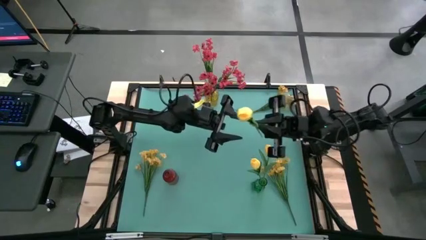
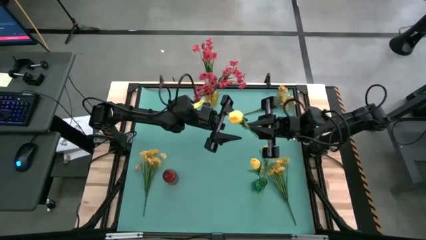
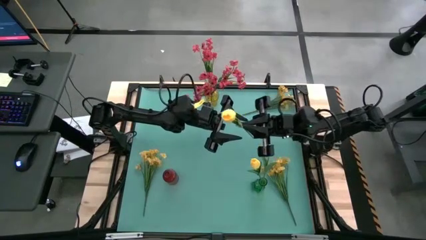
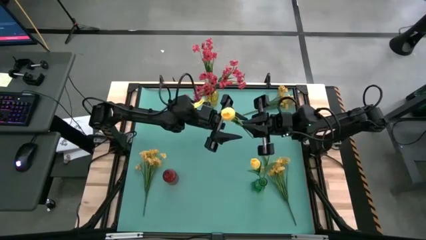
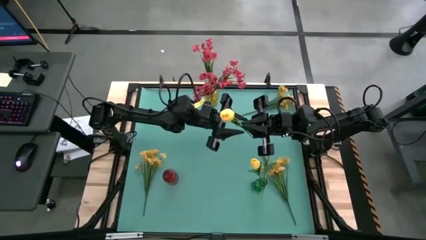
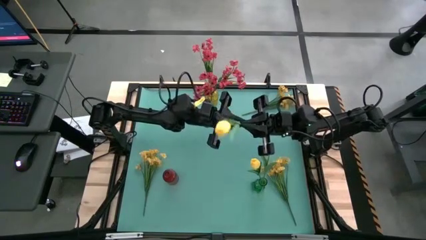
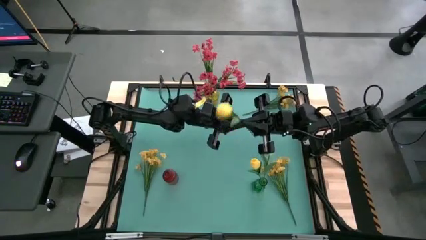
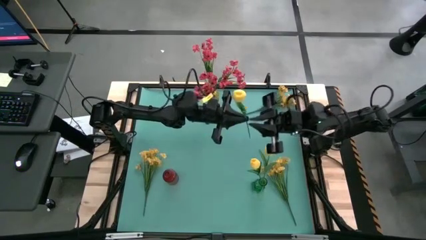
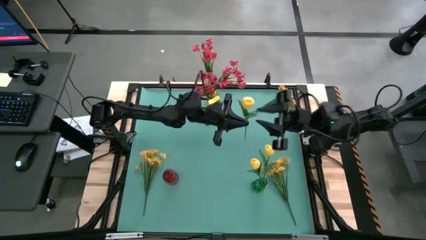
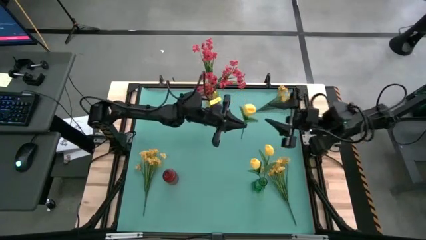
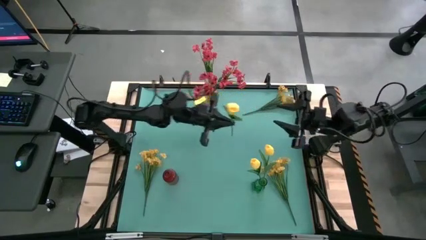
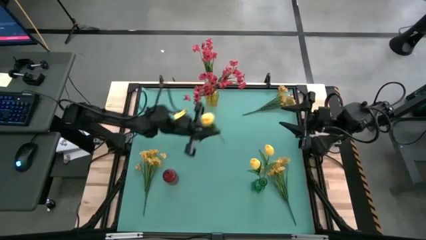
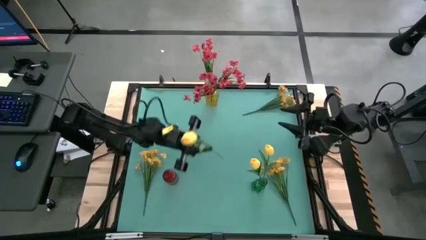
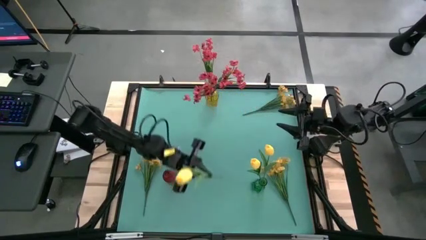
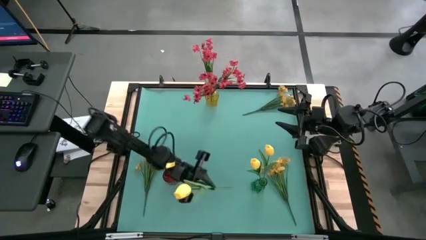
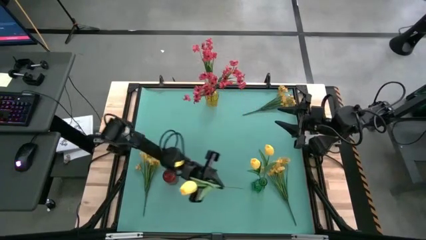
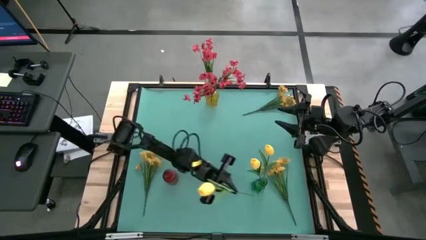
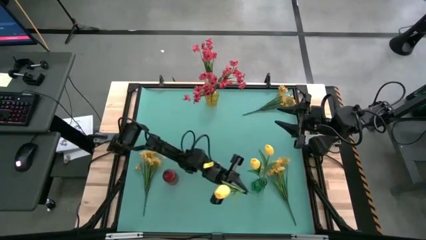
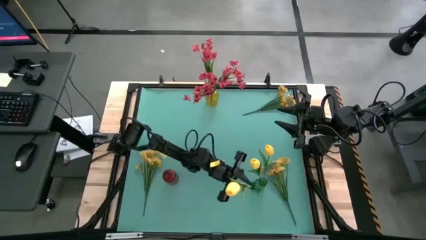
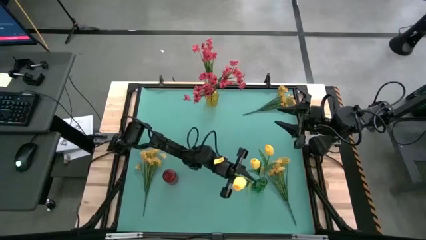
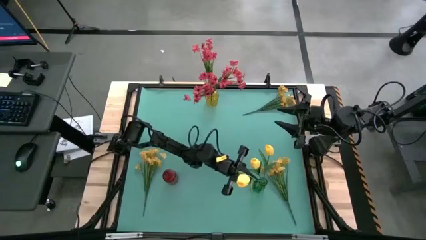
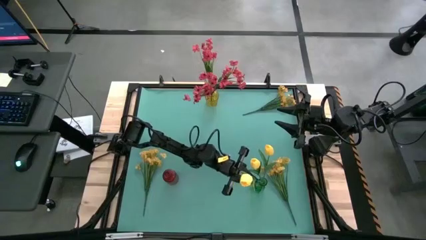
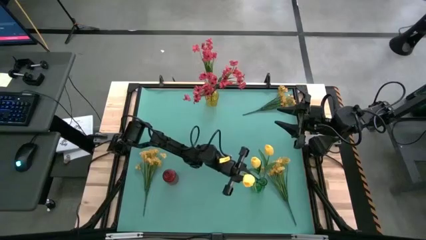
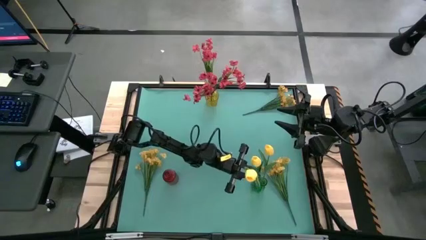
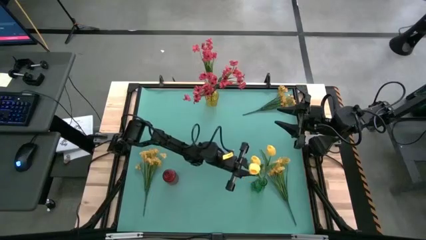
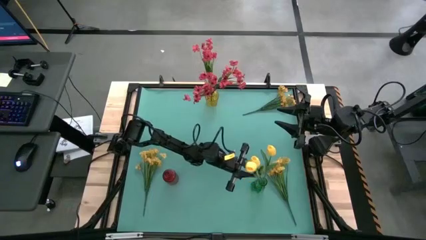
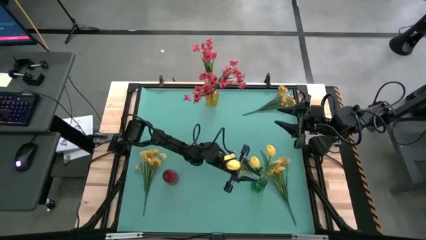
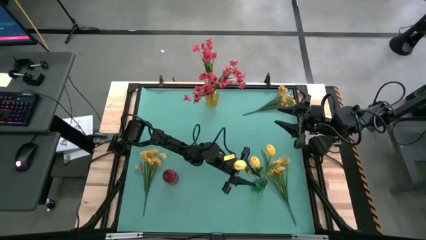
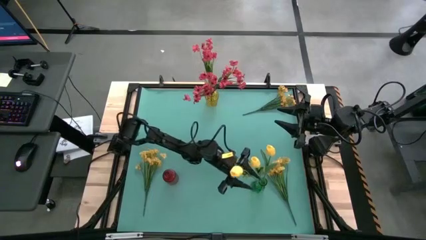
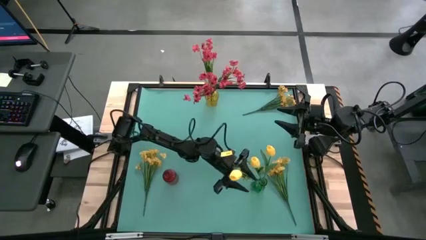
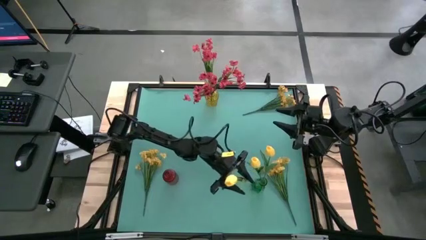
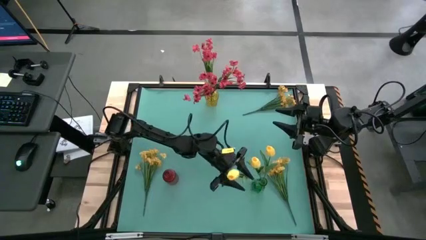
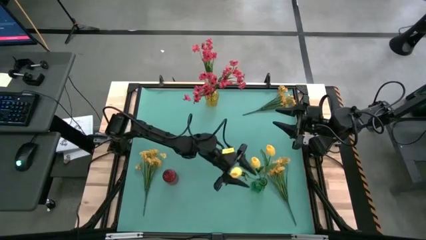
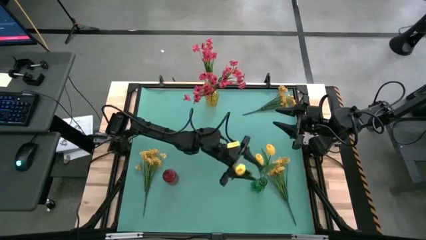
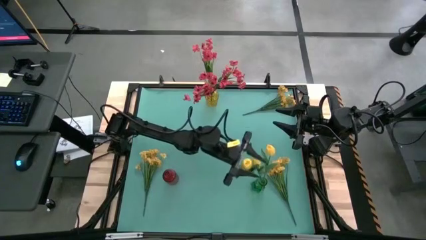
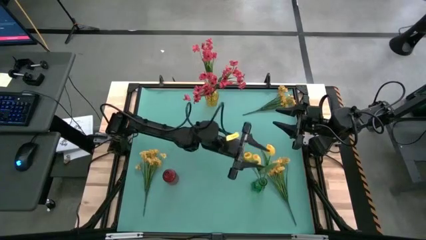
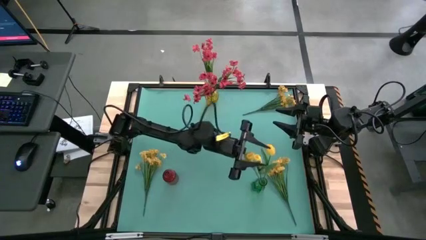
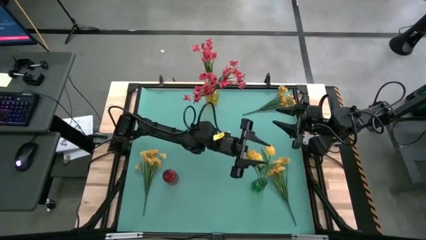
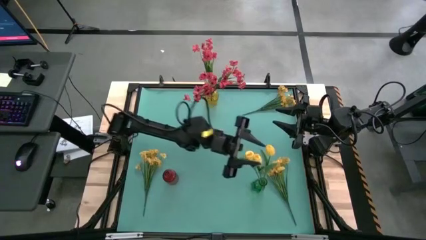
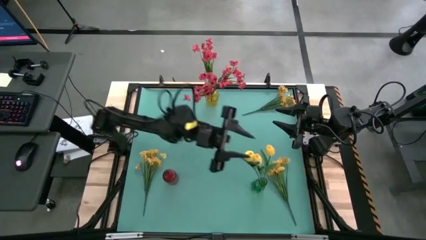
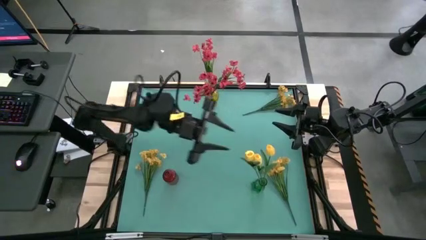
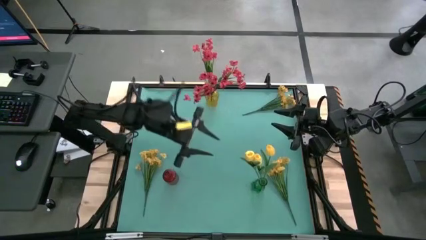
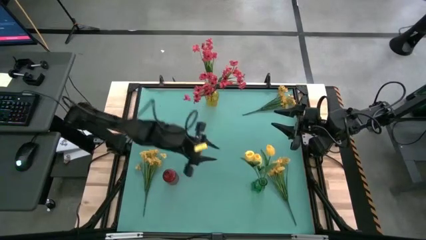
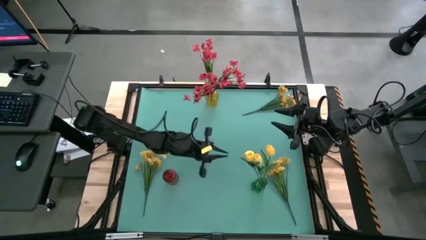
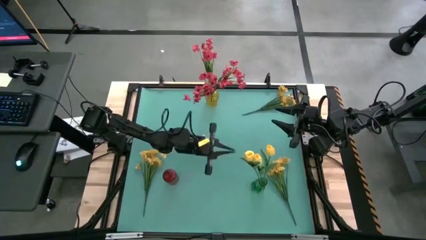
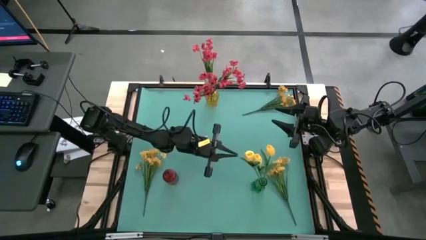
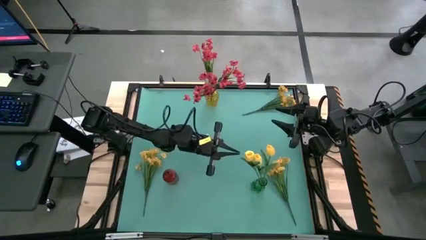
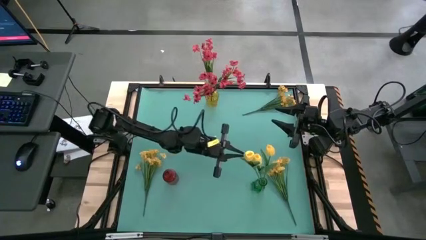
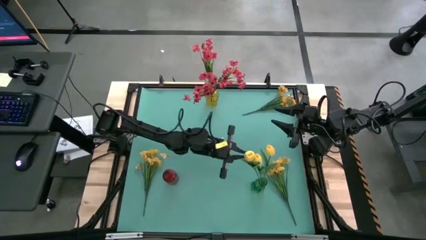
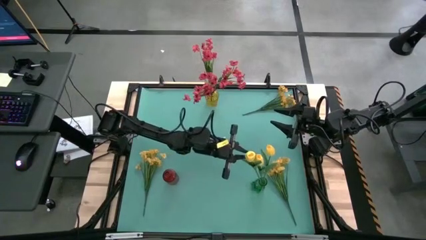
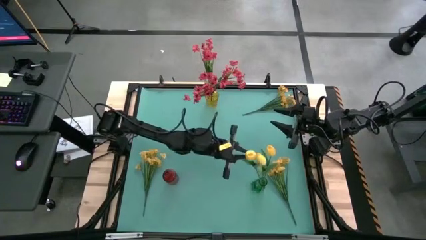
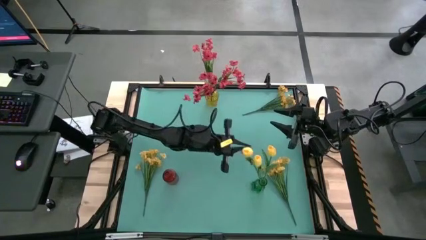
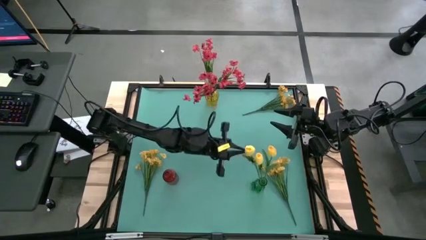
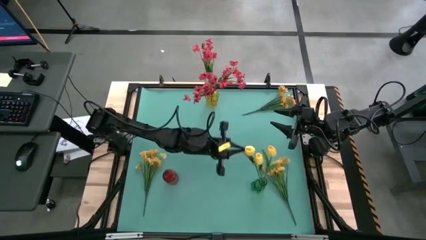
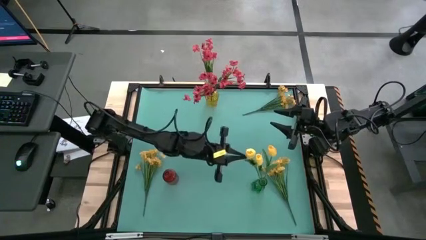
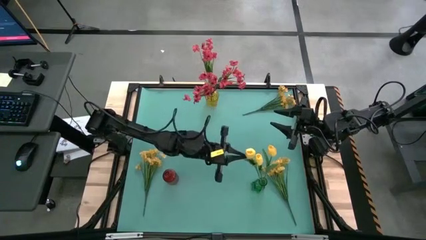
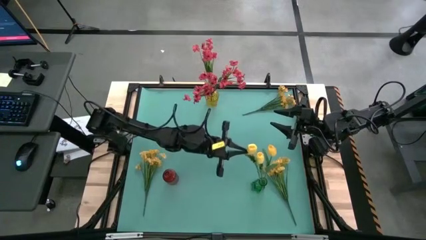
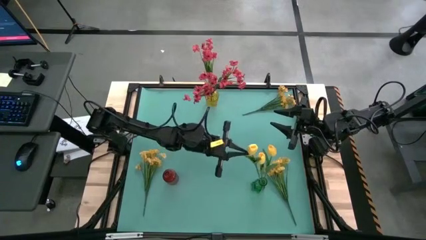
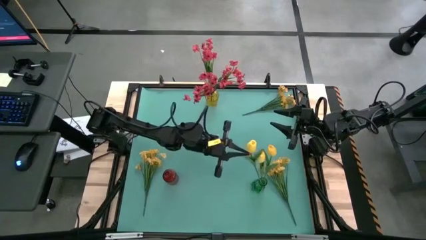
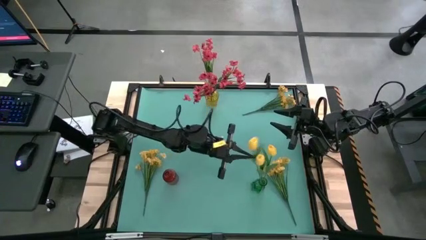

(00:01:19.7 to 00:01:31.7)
Task: Sort flowers into vase by color
Put the yellow tulip into the green vase
